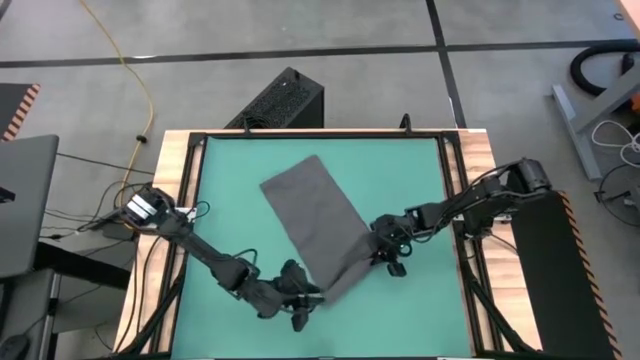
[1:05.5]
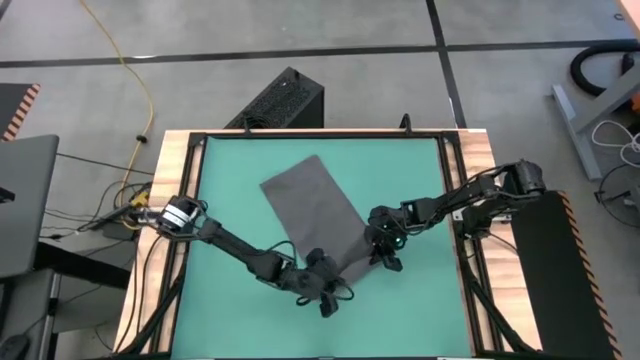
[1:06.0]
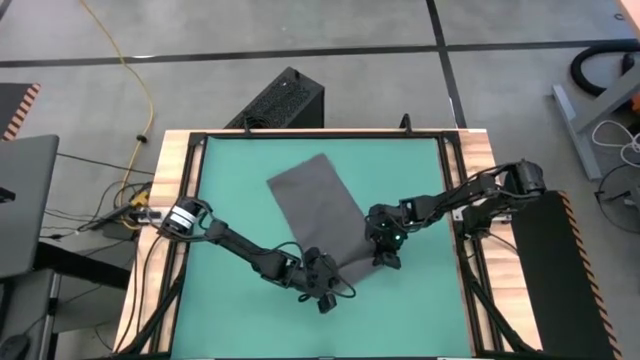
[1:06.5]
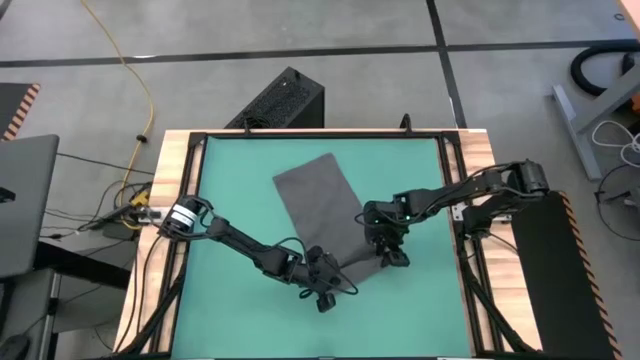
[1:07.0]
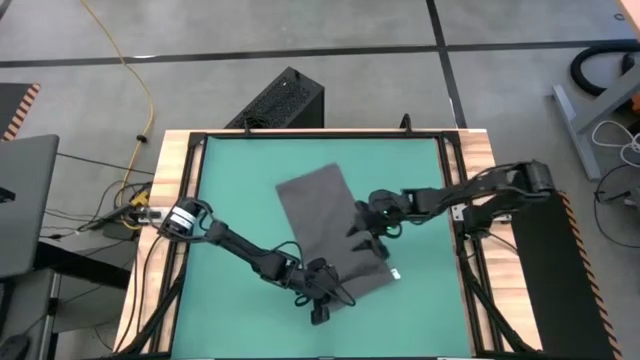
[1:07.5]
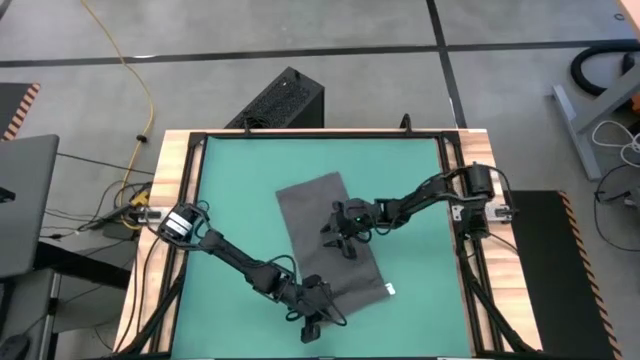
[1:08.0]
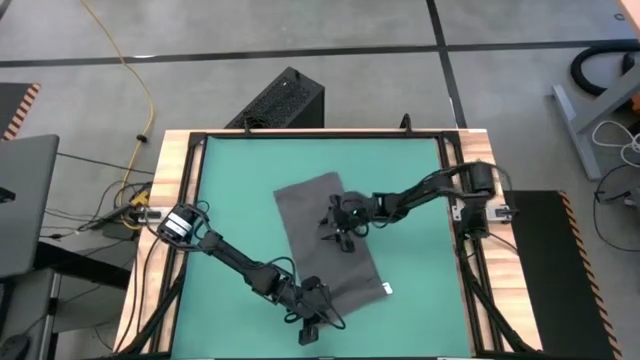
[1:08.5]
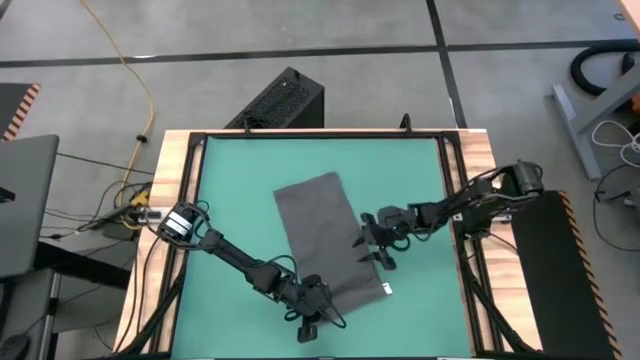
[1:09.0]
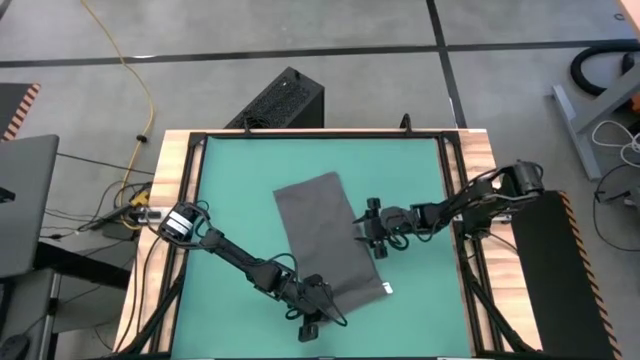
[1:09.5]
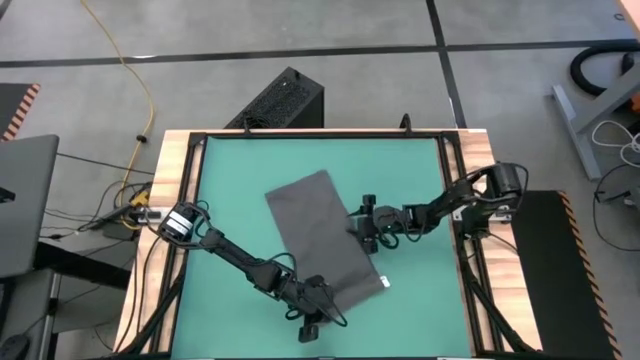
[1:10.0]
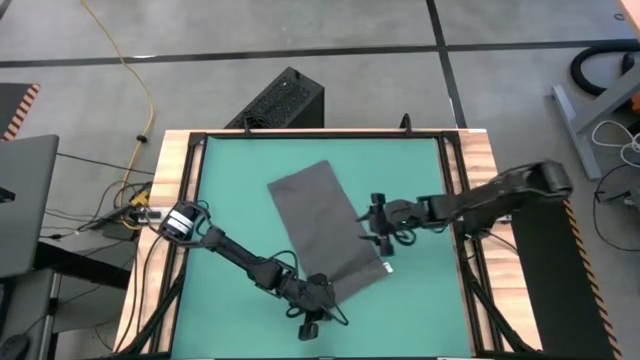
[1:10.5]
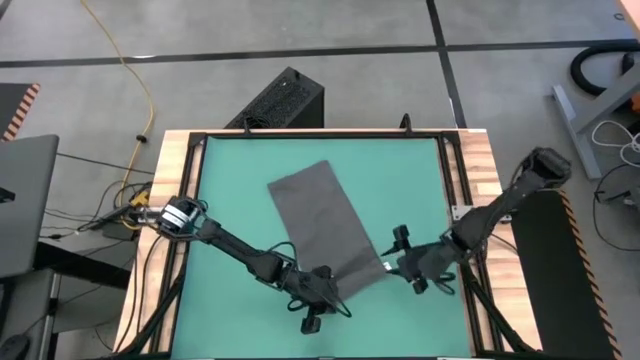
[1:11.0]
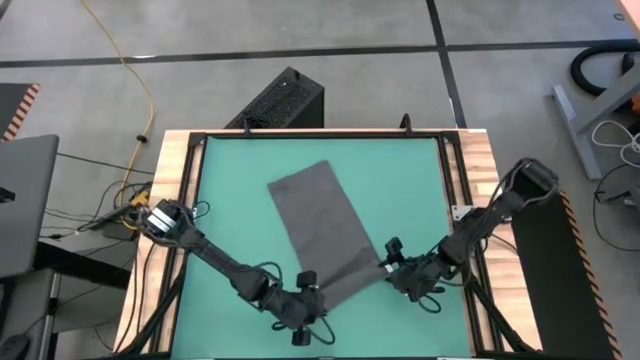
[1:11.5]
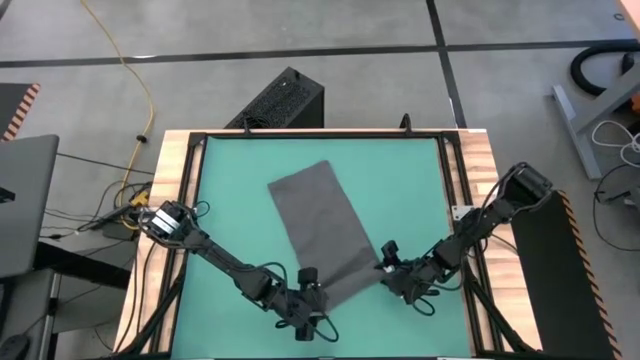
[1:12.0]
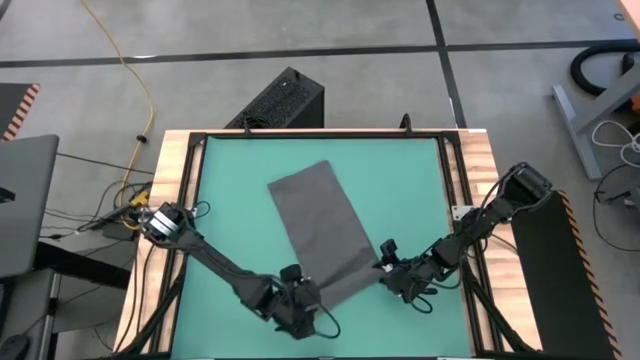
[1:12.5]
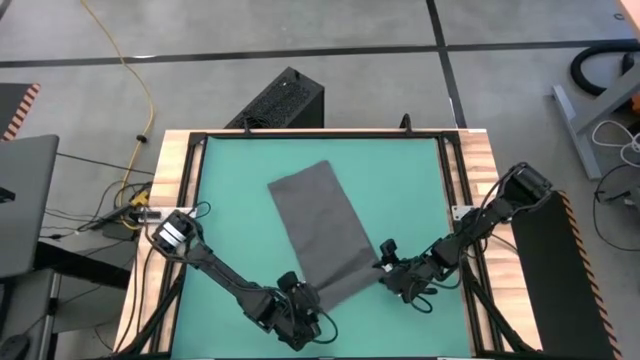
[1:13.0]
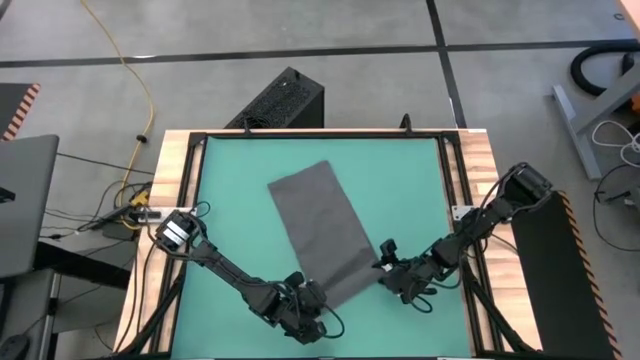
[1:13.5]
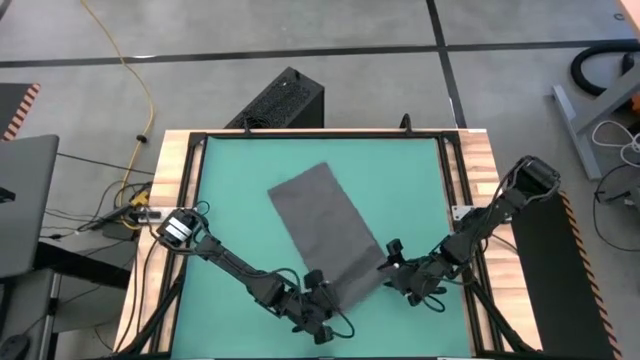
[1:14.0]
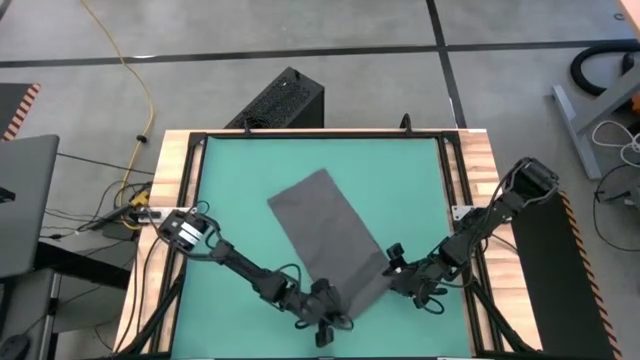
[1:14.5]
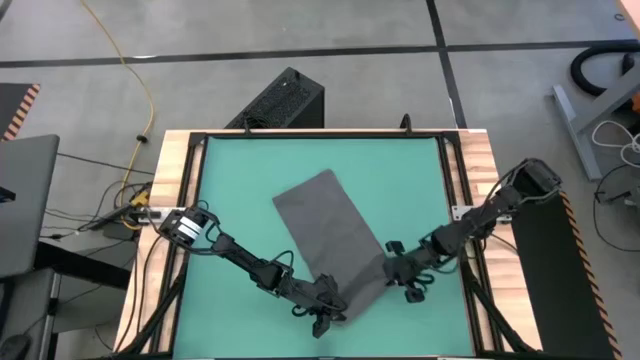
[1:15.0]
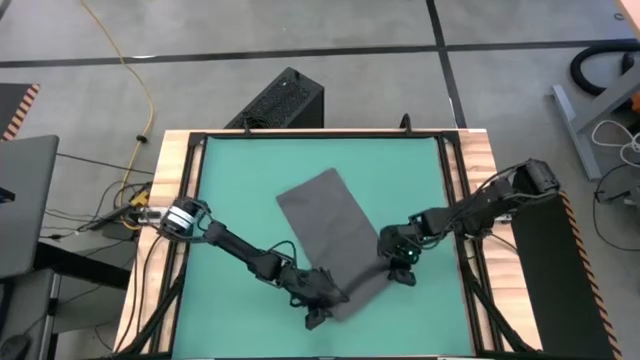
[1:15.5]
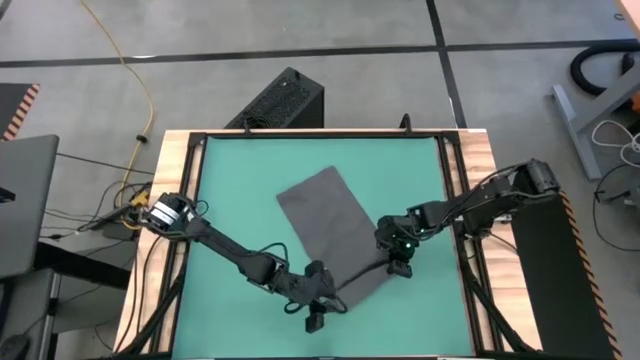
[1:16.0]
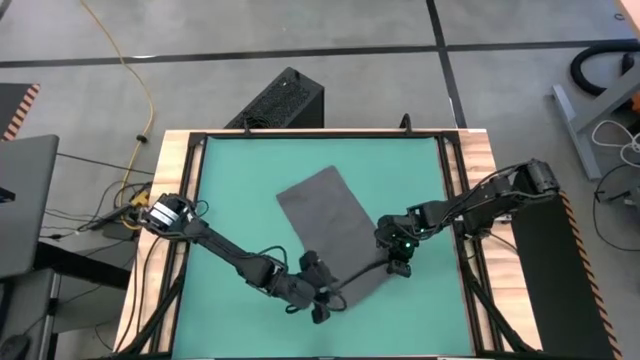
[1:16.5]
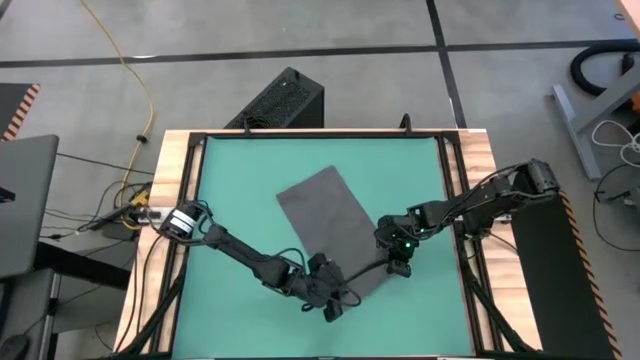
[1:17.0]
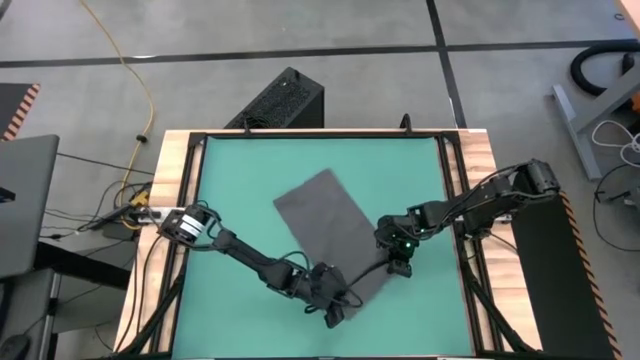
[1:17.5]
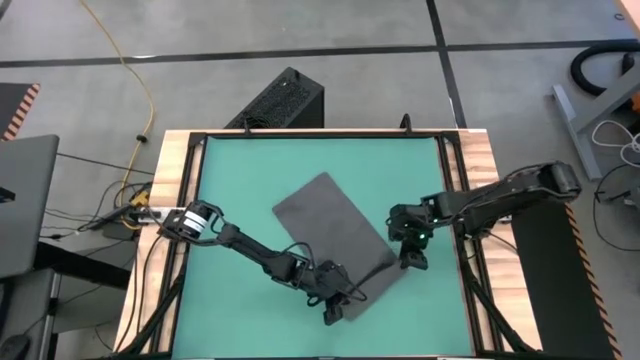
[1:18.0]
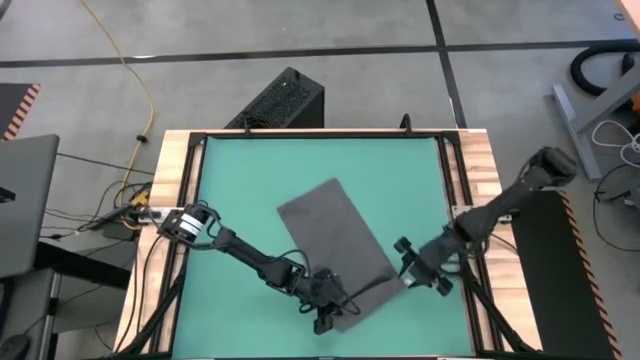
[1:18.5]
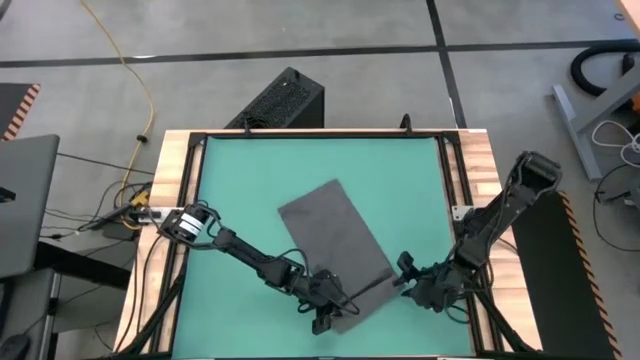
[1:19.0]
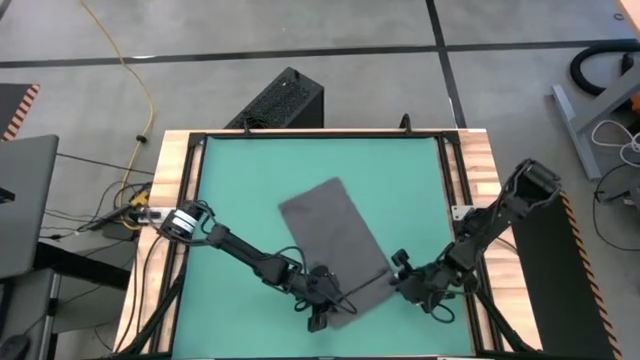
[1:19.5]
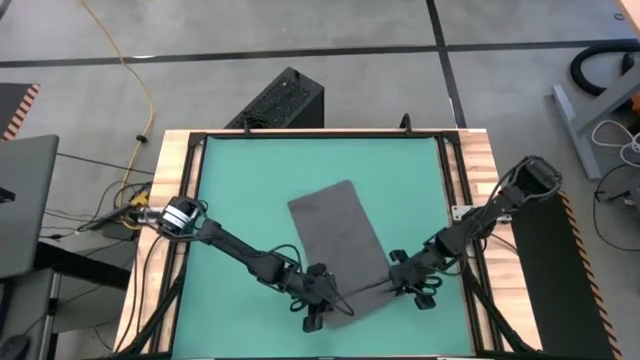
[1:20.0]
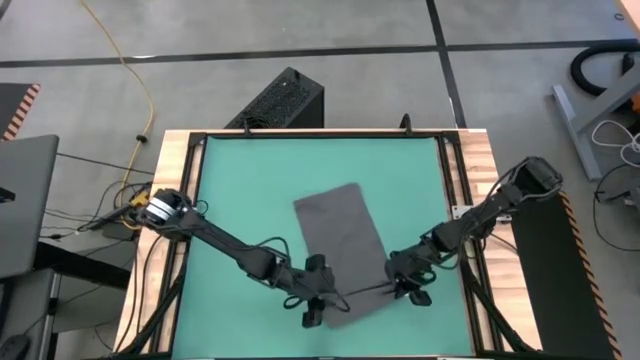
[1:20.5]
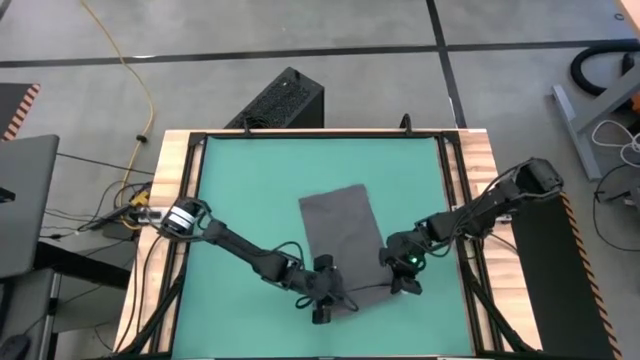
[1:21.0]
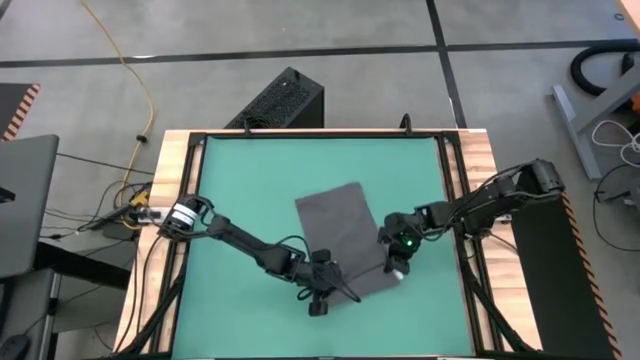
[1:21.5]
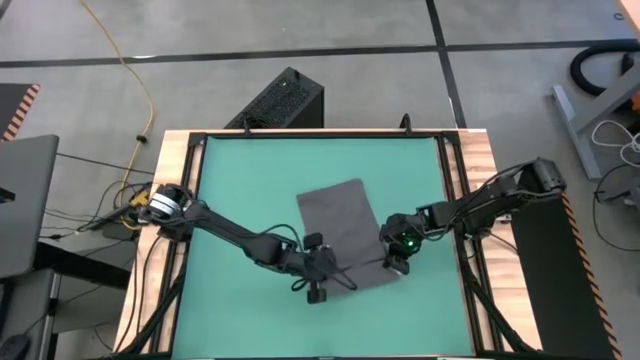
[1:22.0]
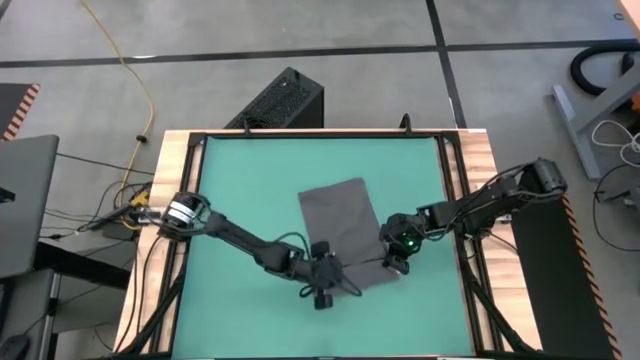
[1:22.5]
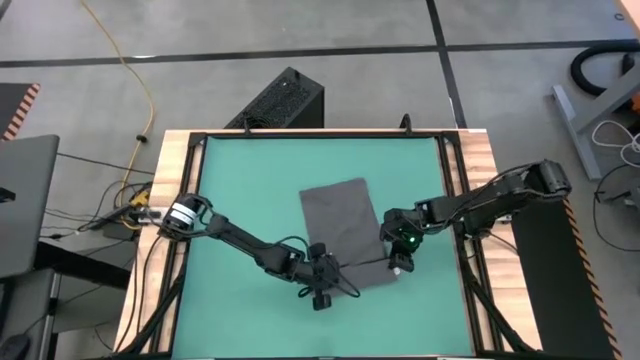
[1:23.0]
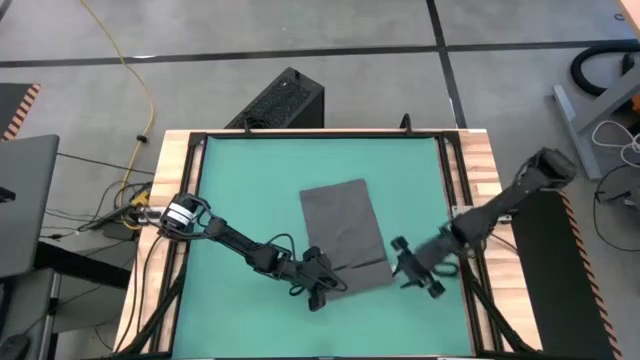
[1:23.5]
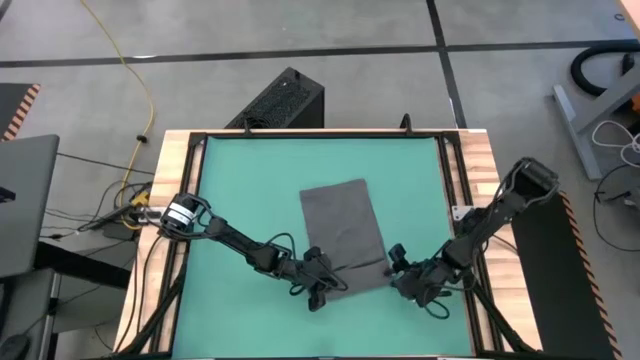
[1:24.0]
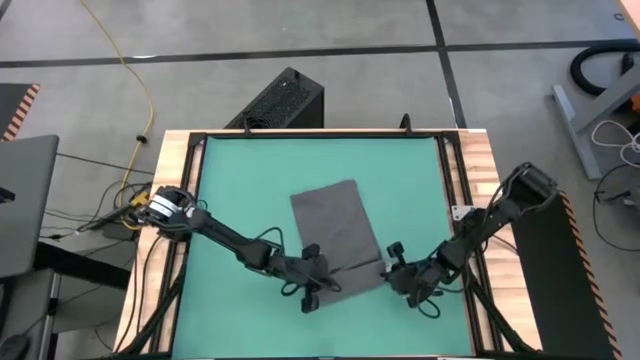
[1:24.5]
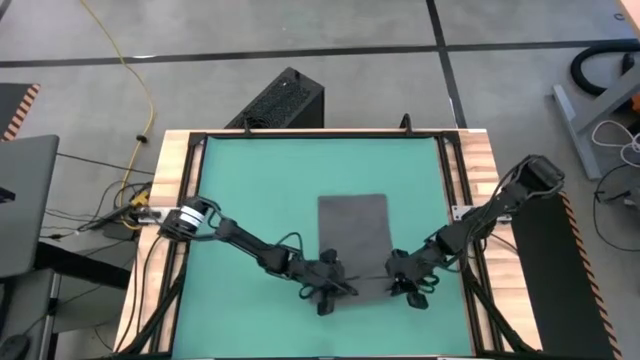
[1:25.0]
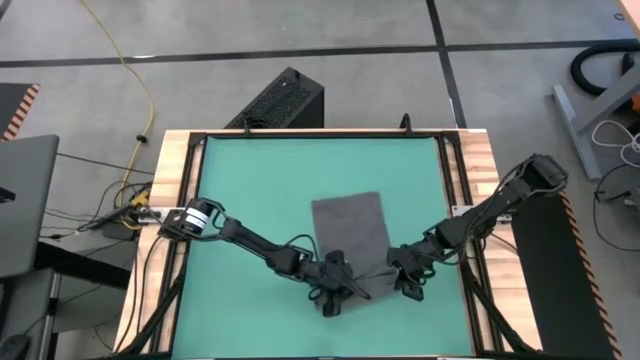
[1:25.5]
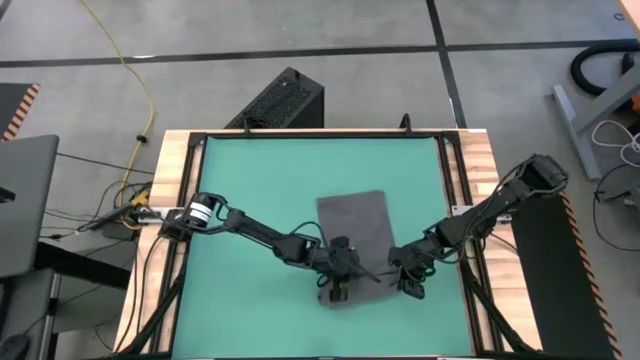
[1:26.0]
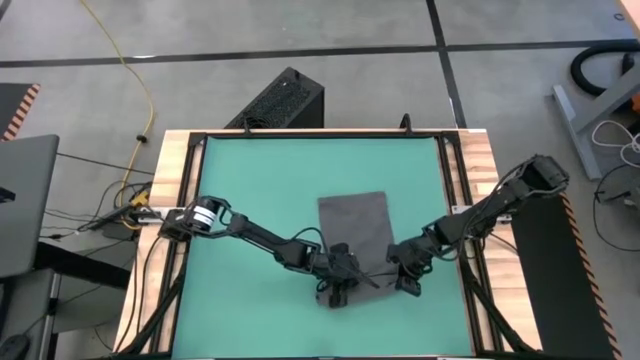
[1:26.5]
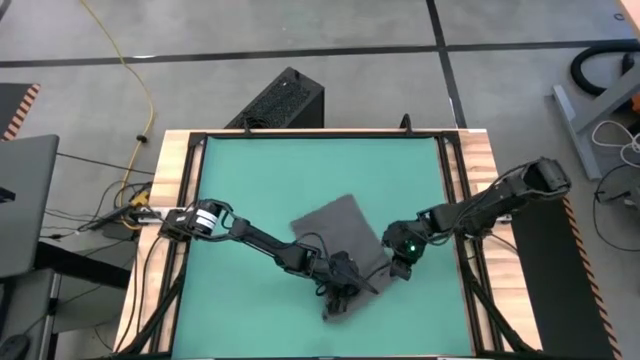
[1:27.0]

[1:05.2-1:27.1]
Task: Roll towel
Roll the black towel
